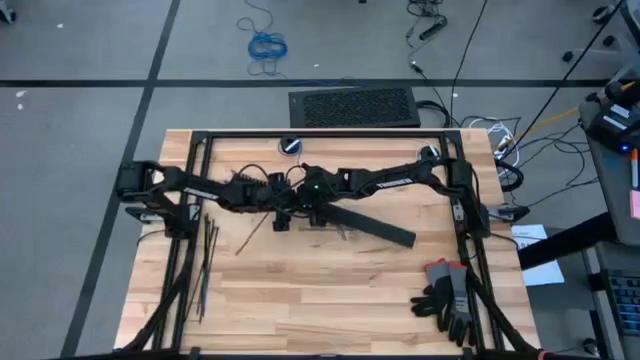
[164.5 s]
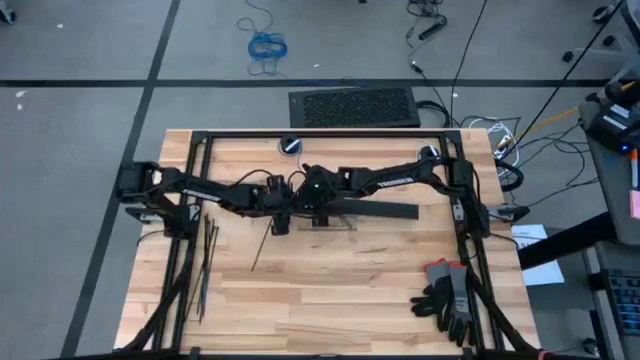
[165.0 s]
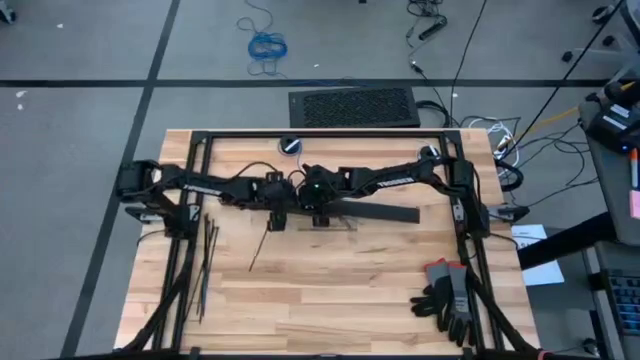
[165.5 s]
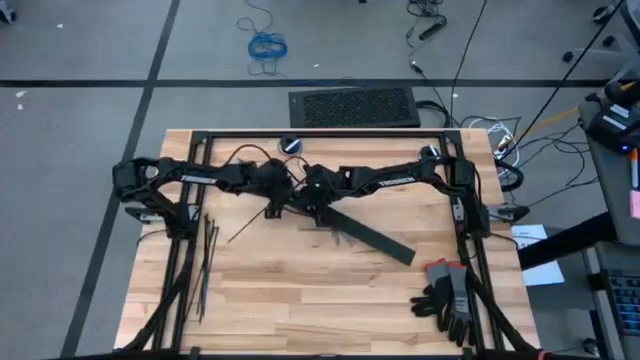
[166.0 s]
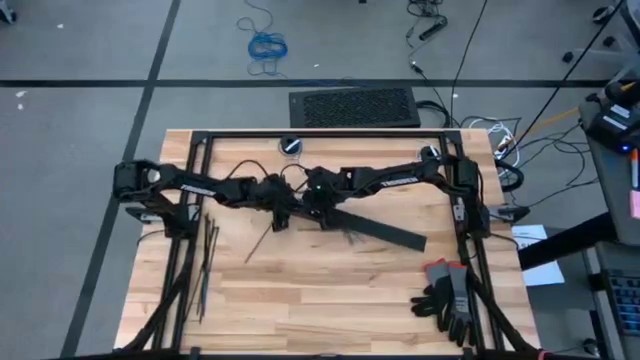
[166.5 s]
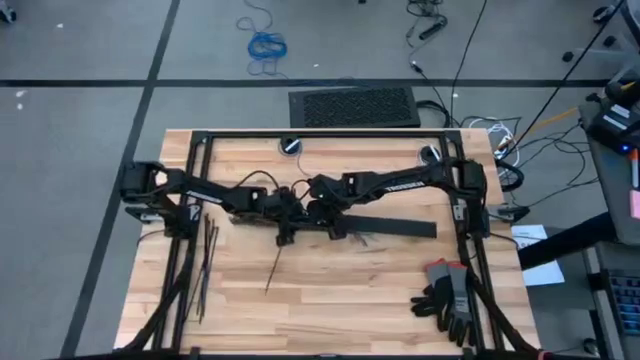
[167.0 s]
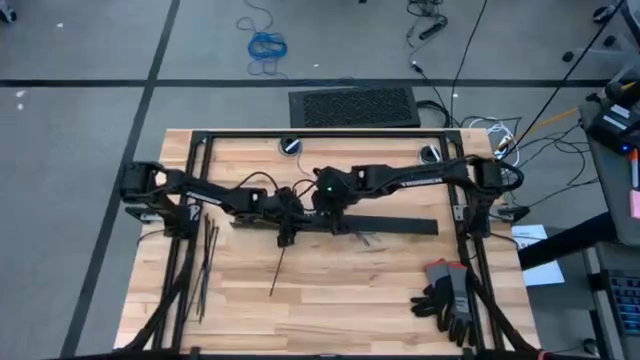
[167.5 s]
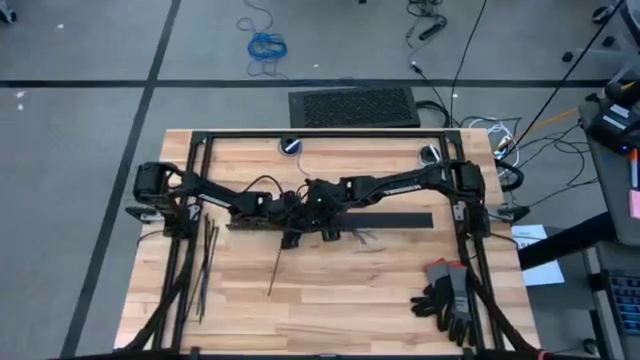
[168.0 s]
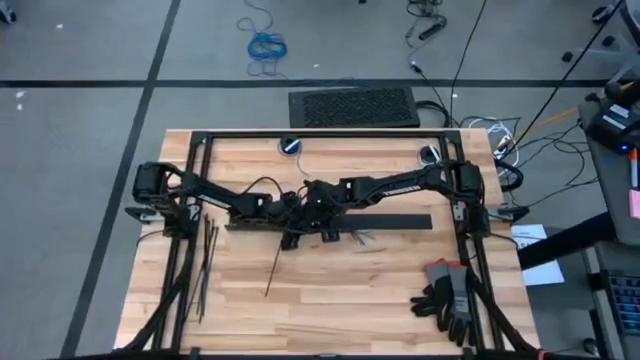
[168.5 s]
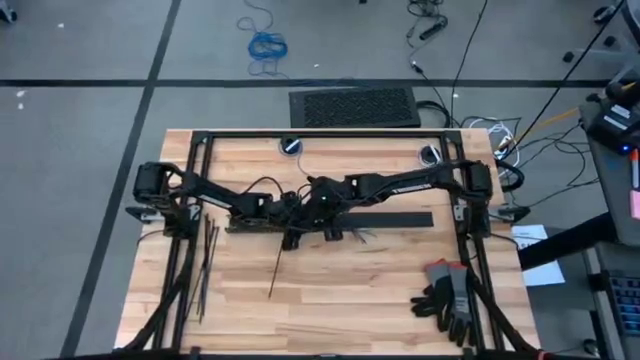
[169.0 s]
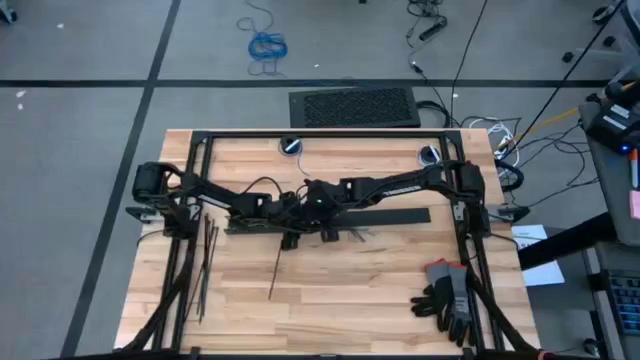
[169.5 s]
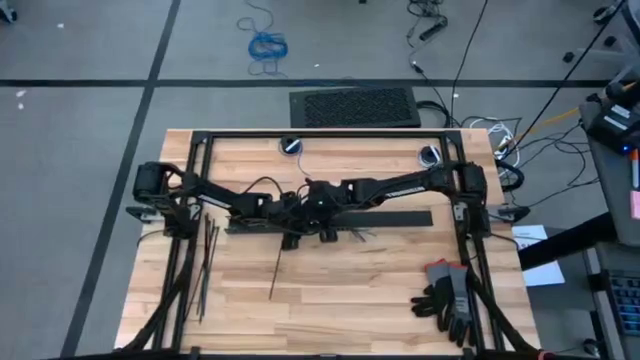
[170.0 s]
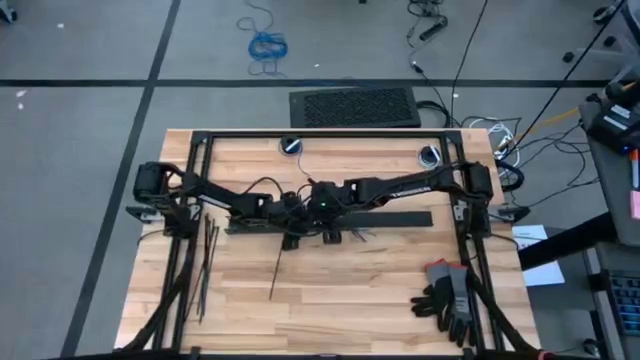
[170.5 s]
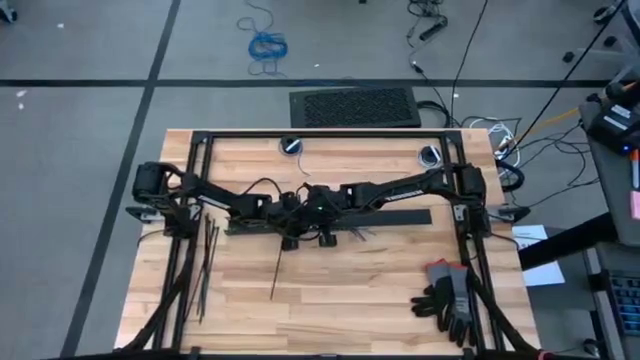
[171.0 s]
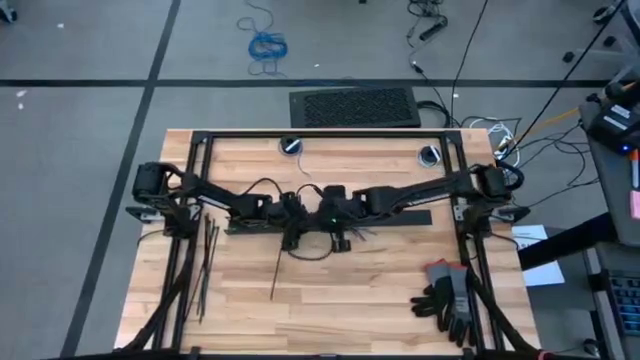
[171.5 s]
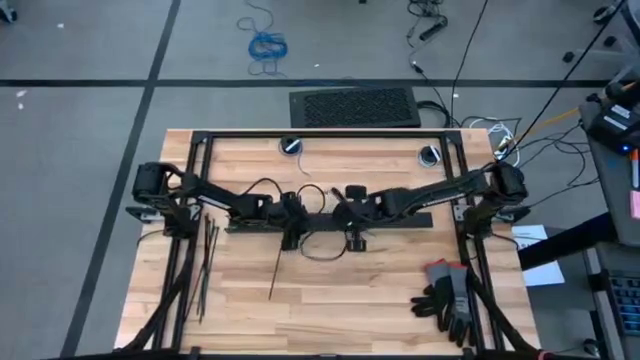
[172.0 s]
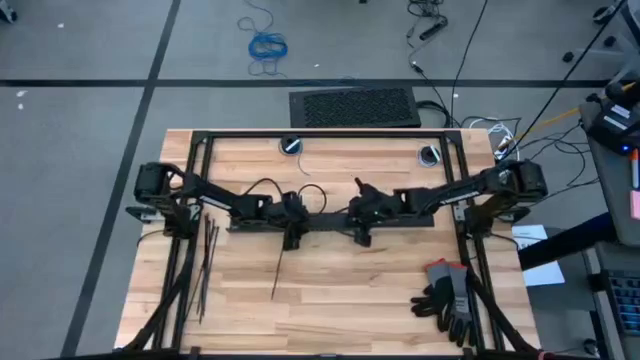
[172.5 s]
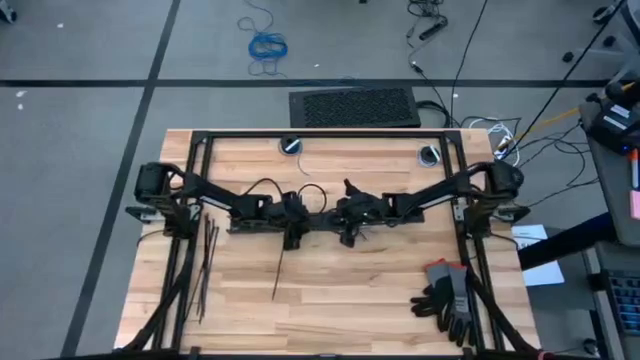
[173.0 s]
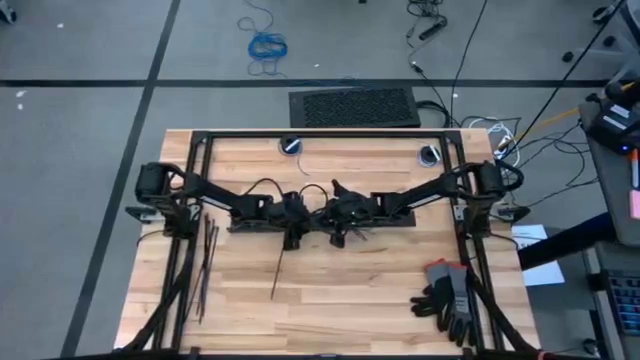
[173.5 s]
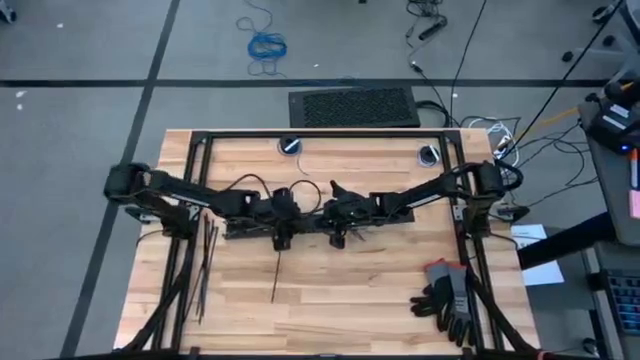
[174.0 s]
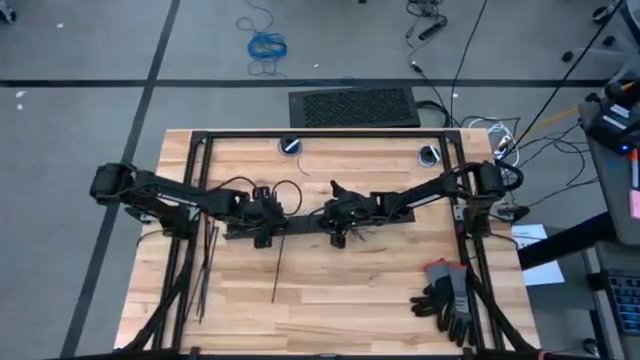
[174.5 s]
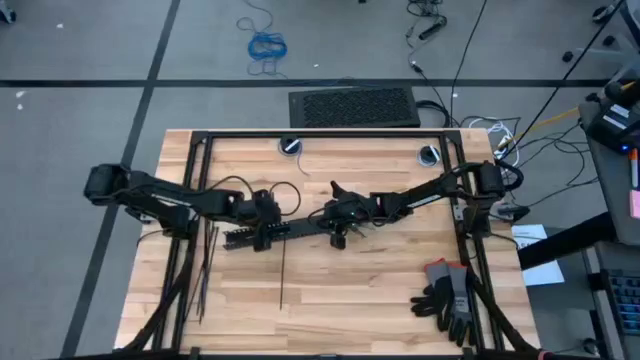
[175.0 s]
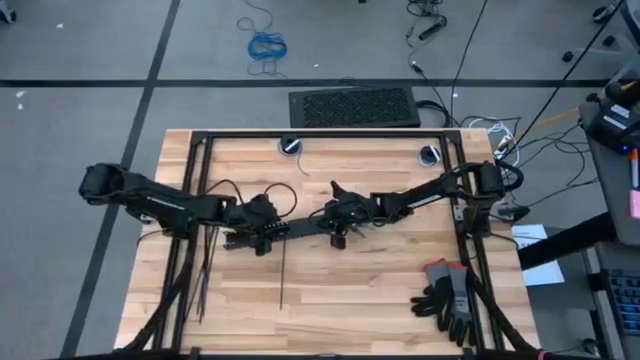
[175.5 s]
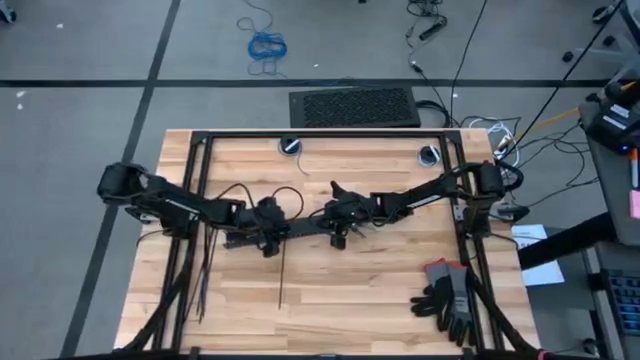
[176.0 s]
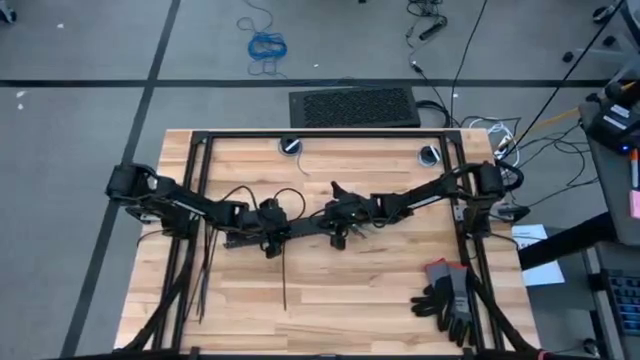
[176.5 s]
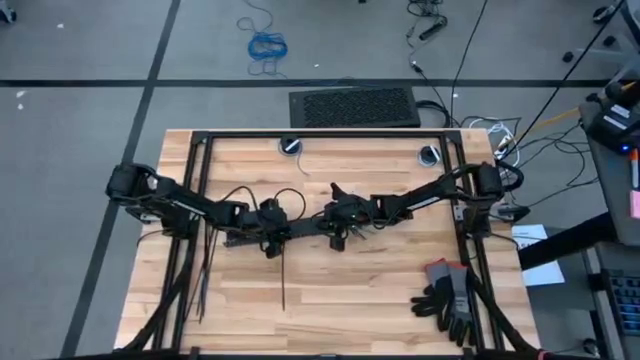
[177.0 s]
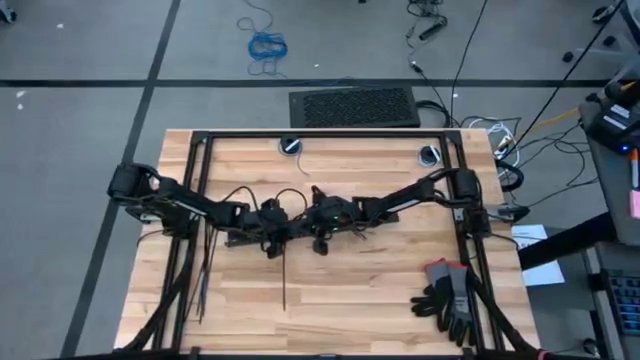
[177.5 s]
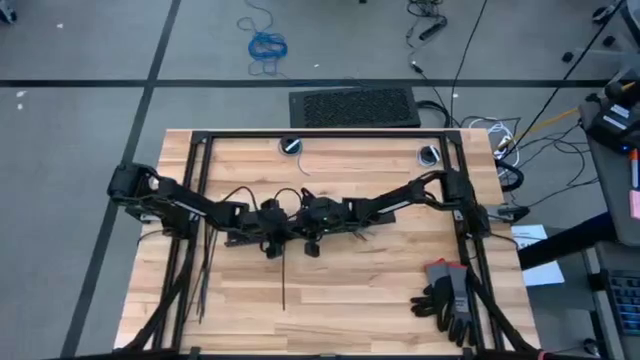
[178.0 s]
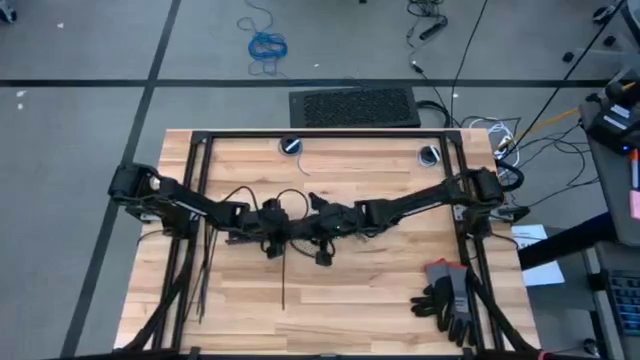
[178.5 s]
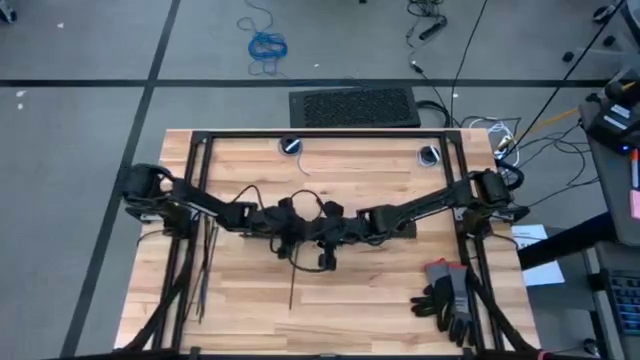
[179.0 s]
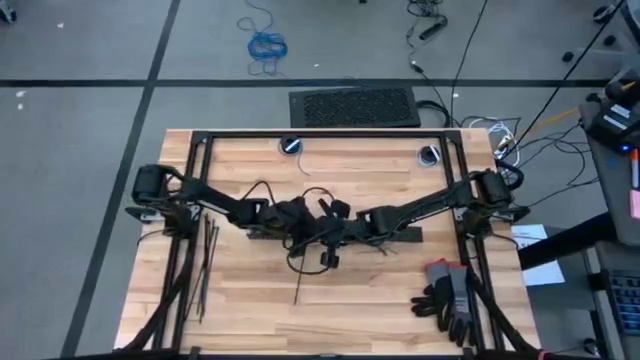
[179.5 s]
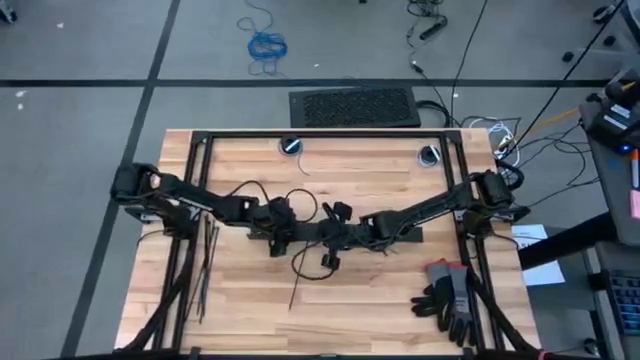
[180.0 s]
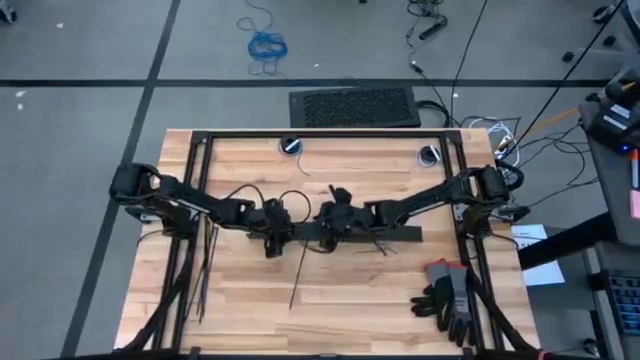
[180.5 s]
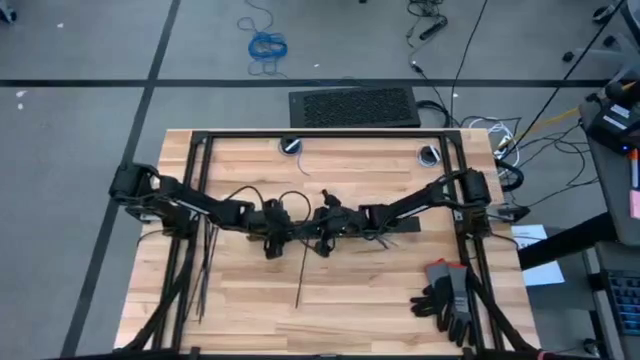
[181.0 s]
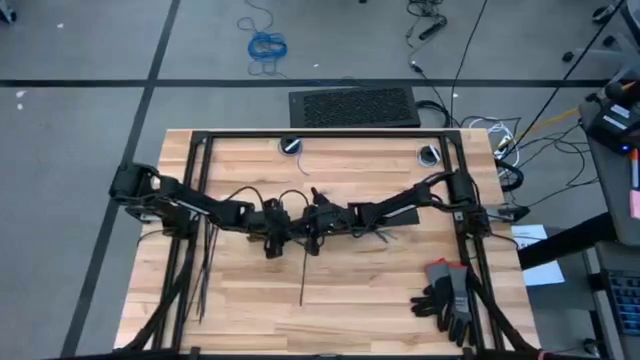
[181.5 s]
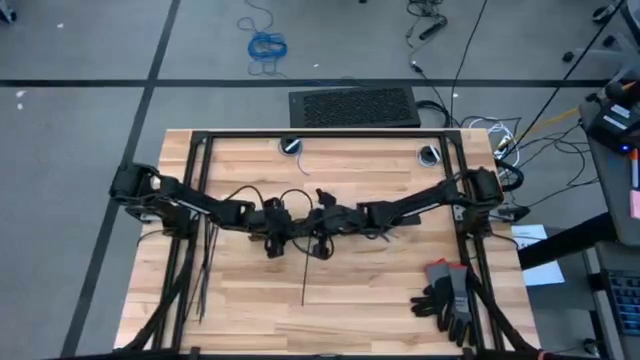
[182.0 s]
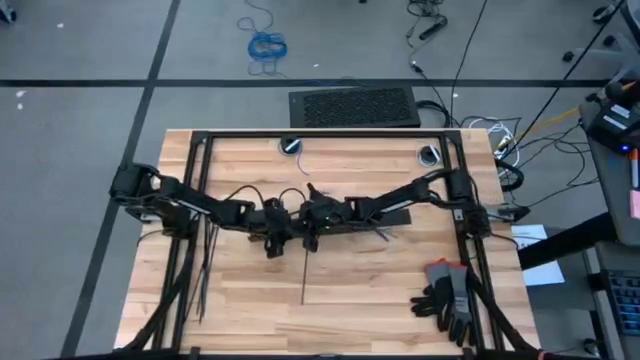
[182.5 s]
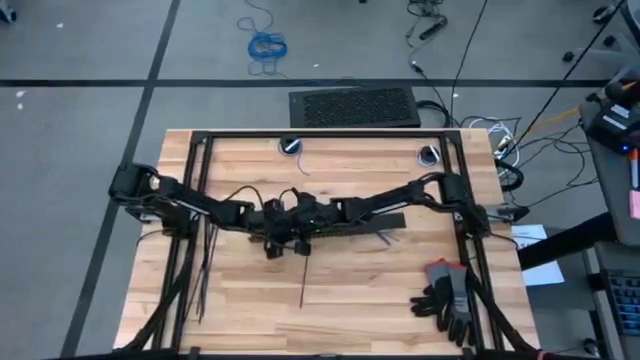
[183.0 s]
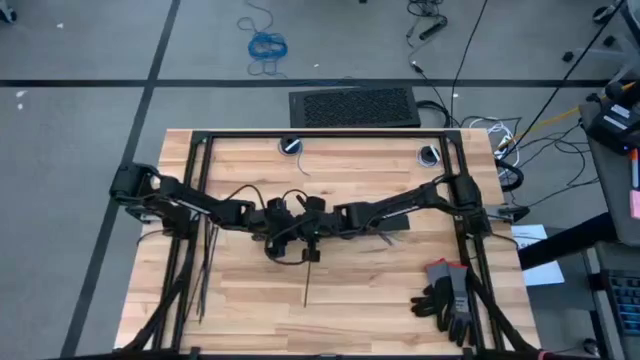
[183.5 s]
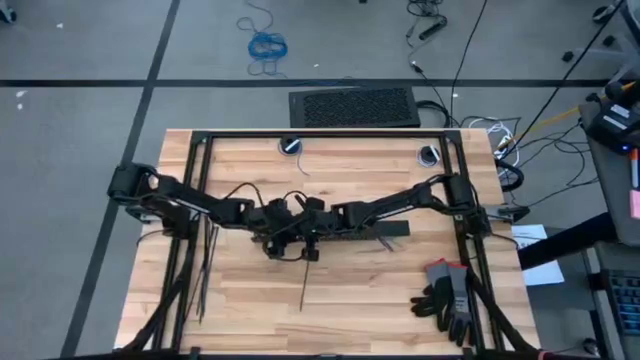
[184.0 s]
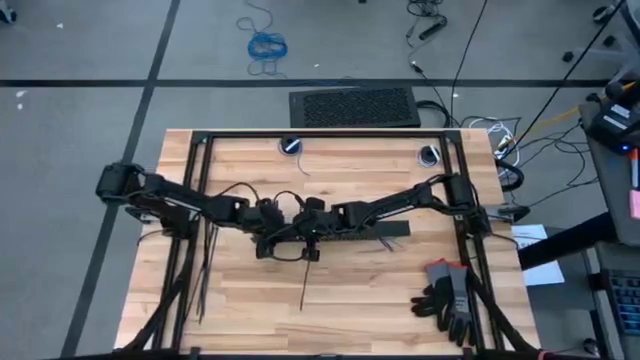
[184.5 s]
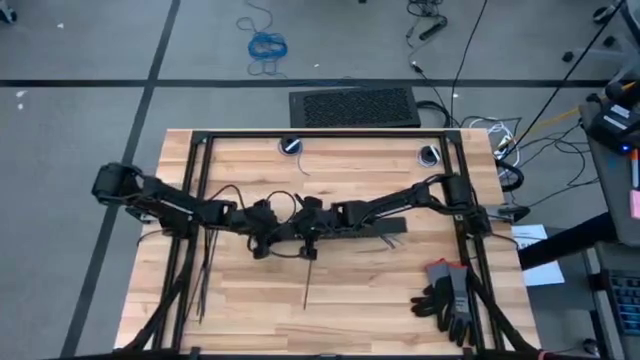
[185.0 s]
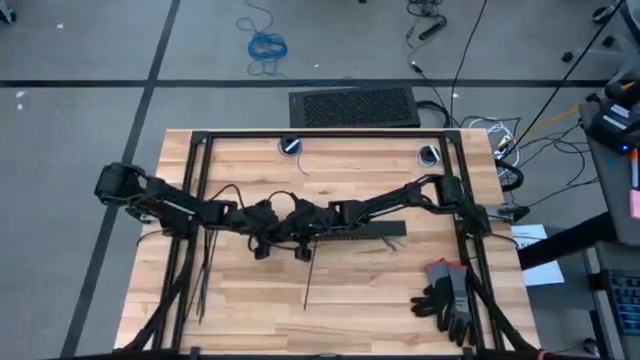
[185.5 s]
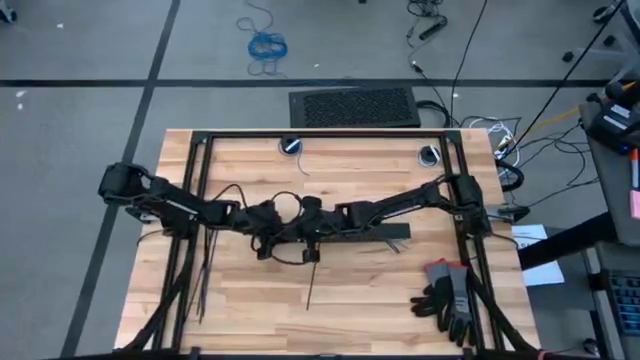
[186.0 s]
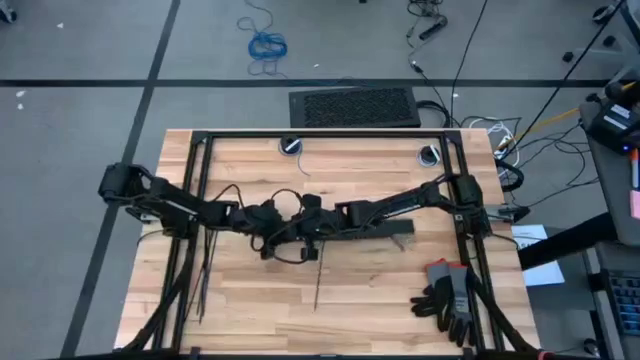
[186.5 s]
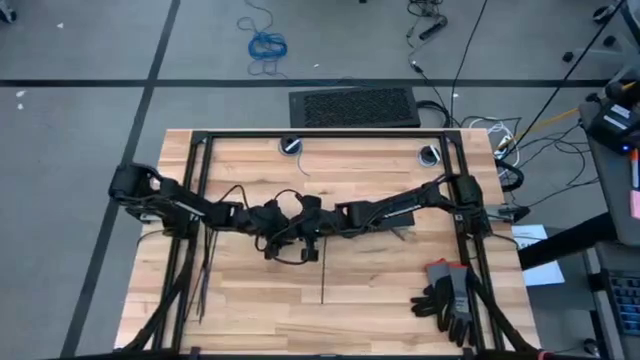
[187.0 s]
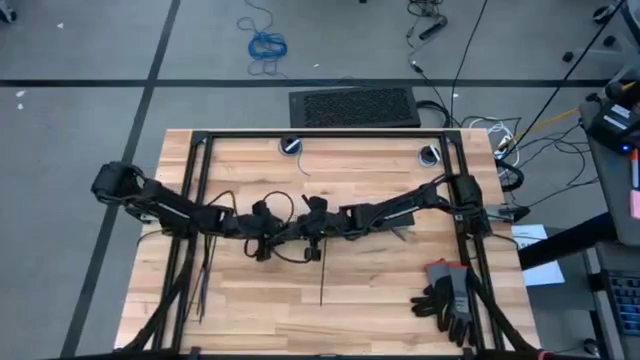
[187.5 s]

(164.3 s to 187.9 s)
Task: Ziptie cables
Close the cable duct
